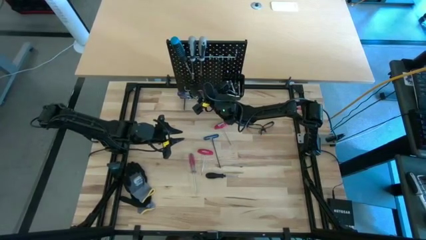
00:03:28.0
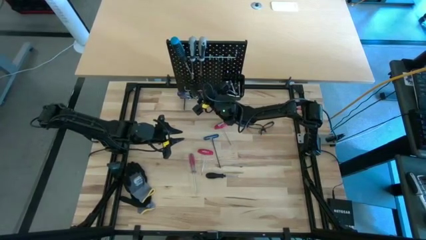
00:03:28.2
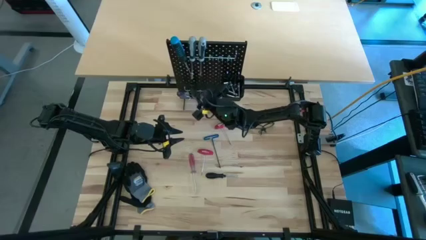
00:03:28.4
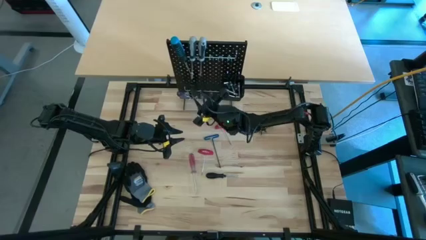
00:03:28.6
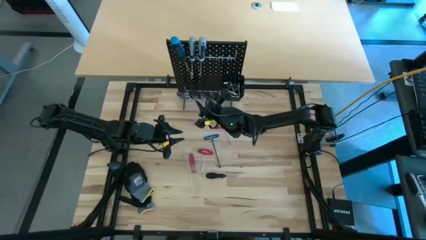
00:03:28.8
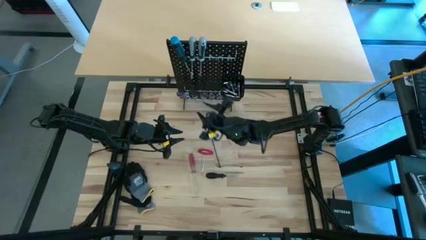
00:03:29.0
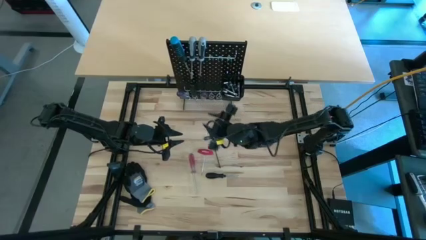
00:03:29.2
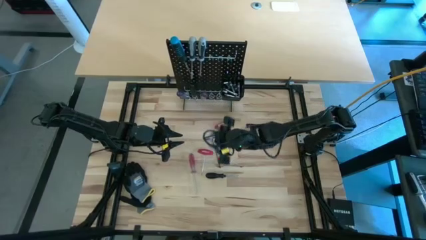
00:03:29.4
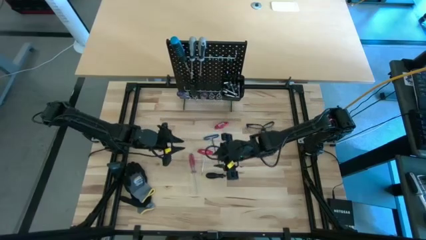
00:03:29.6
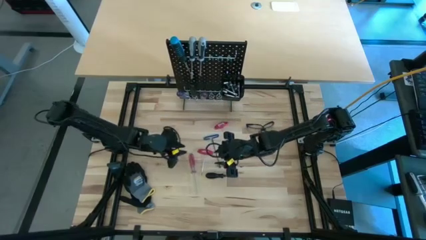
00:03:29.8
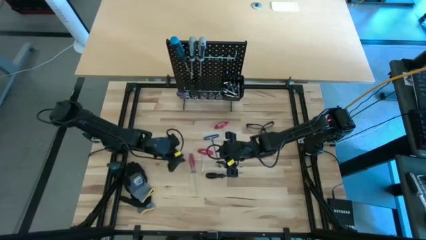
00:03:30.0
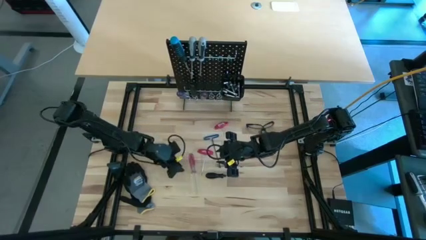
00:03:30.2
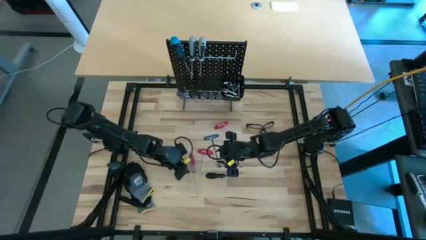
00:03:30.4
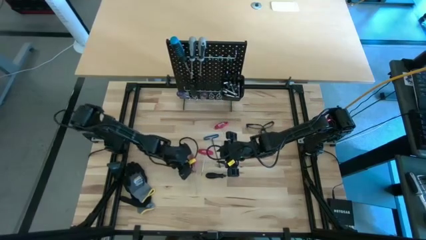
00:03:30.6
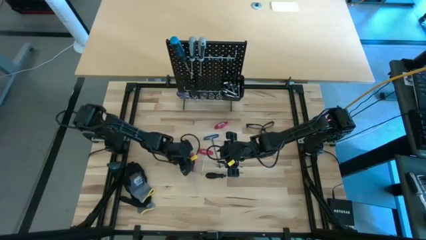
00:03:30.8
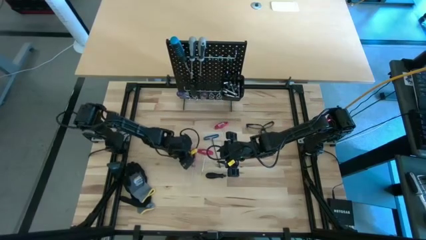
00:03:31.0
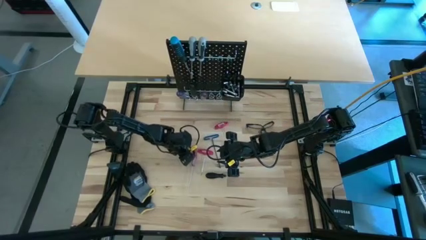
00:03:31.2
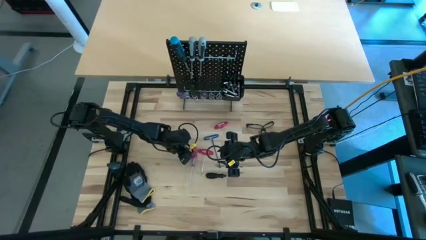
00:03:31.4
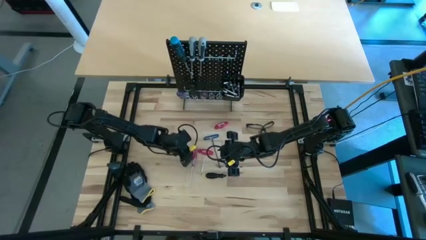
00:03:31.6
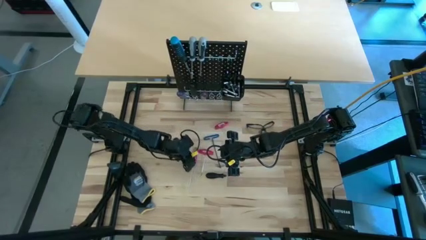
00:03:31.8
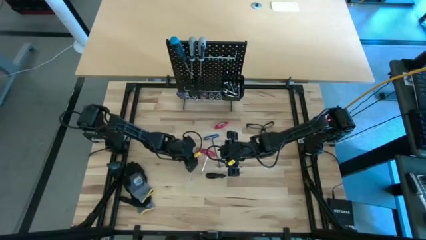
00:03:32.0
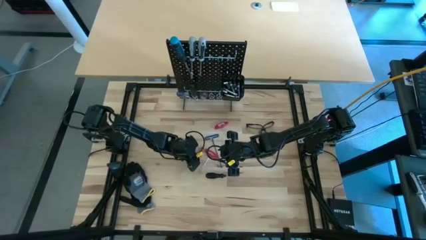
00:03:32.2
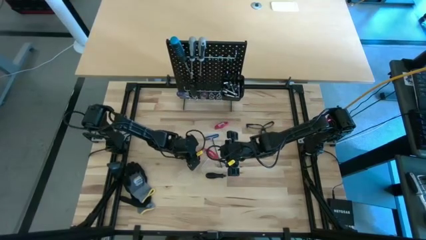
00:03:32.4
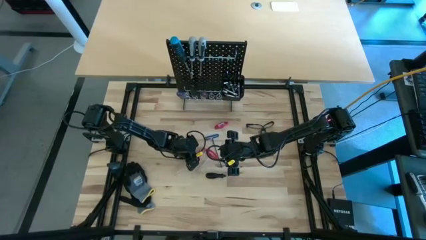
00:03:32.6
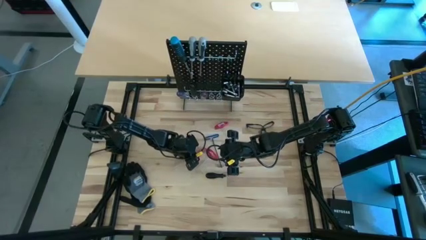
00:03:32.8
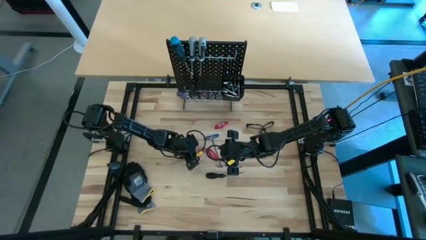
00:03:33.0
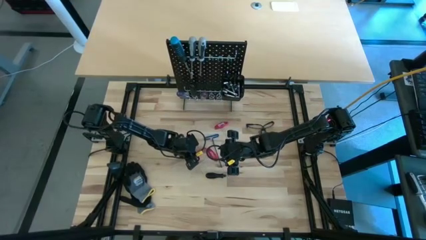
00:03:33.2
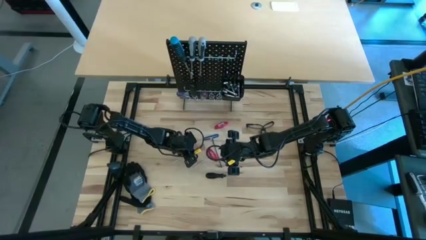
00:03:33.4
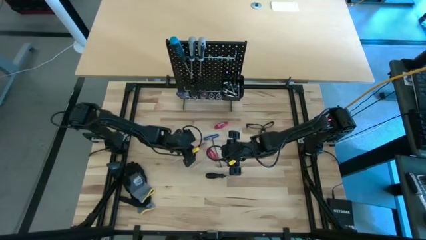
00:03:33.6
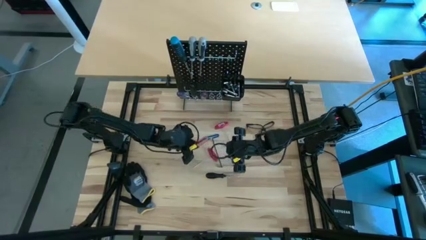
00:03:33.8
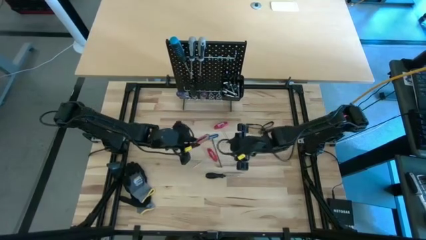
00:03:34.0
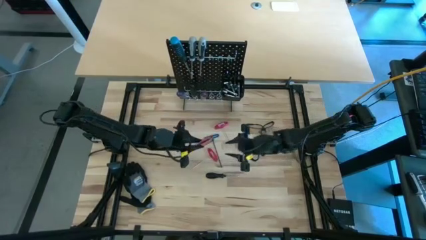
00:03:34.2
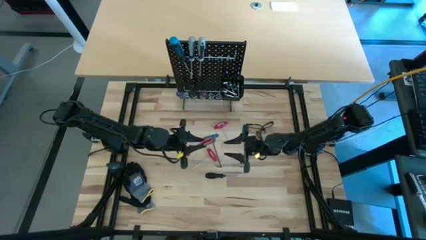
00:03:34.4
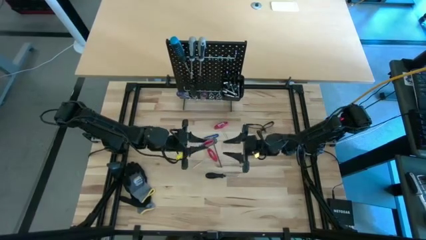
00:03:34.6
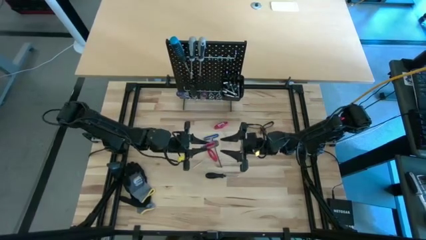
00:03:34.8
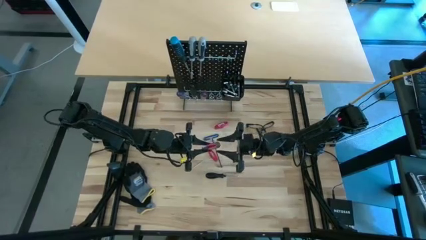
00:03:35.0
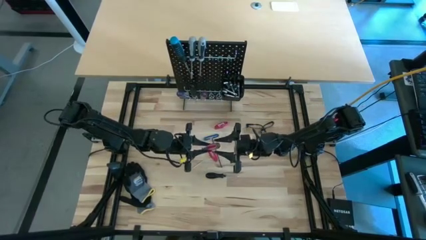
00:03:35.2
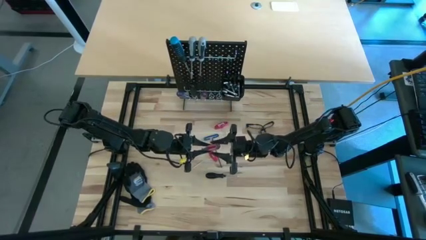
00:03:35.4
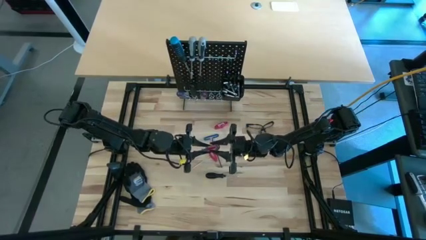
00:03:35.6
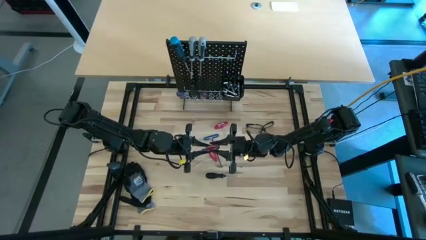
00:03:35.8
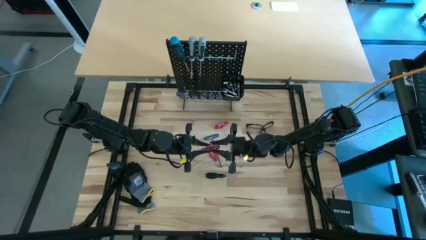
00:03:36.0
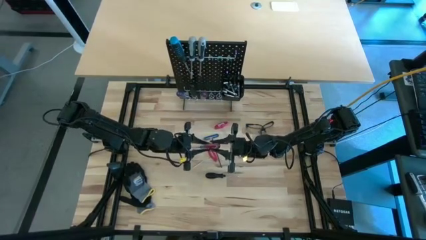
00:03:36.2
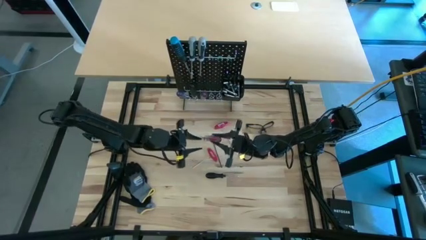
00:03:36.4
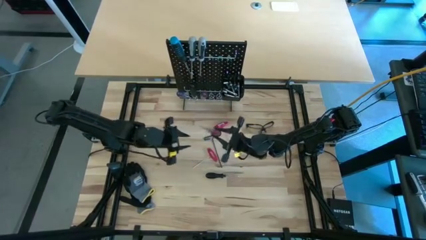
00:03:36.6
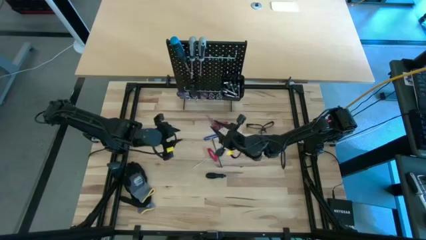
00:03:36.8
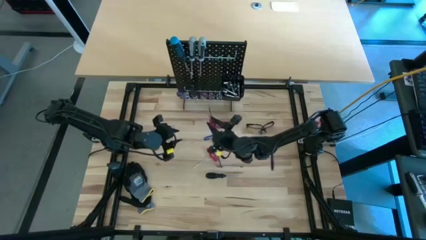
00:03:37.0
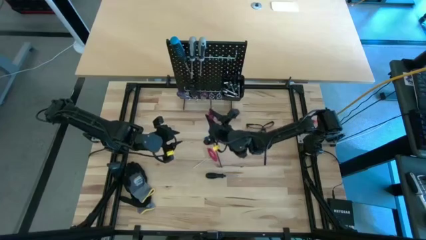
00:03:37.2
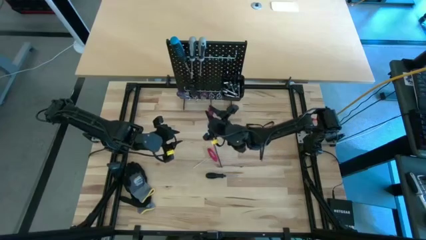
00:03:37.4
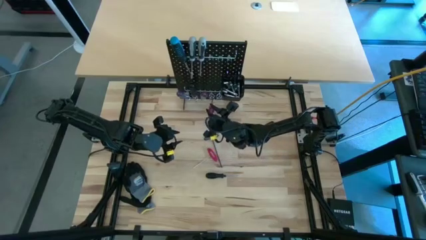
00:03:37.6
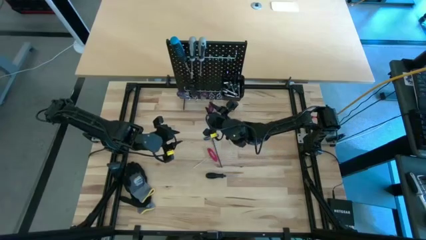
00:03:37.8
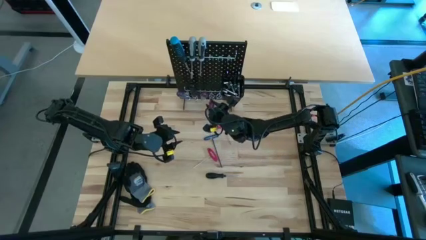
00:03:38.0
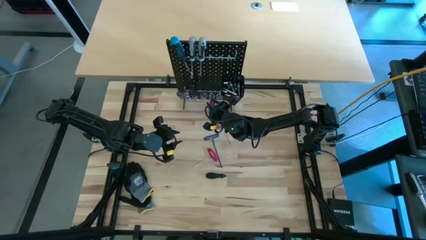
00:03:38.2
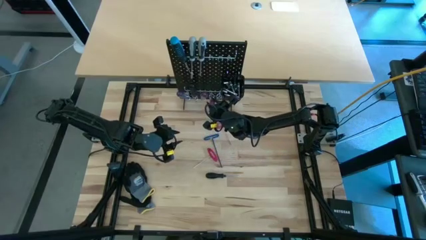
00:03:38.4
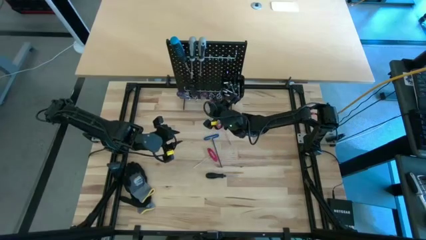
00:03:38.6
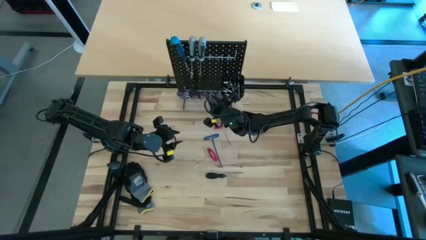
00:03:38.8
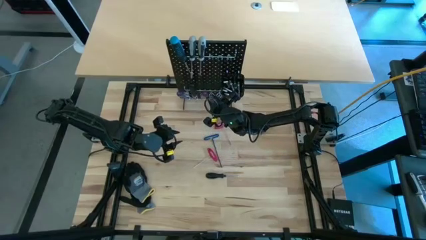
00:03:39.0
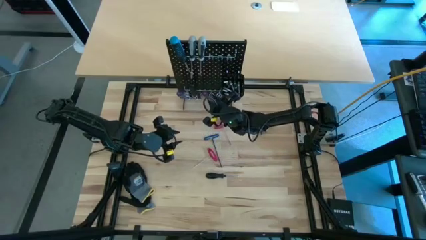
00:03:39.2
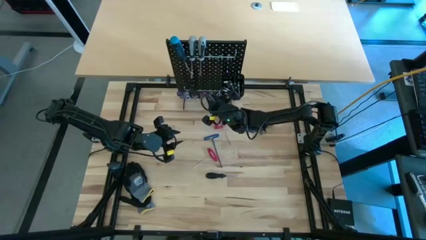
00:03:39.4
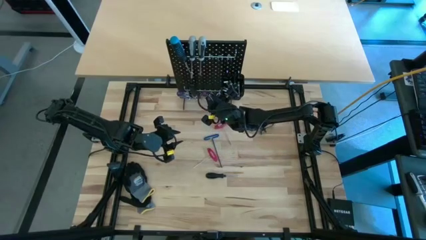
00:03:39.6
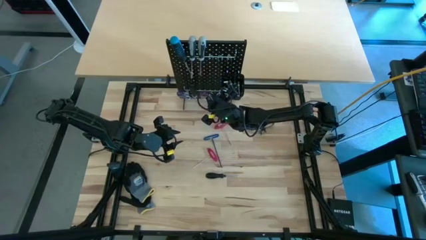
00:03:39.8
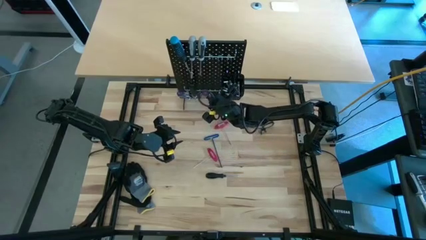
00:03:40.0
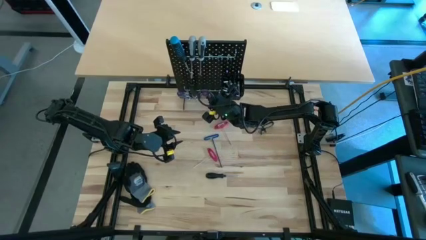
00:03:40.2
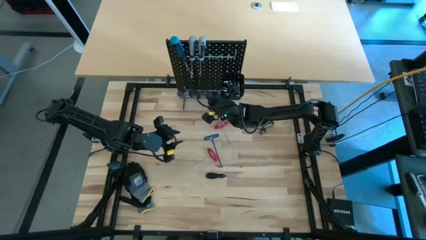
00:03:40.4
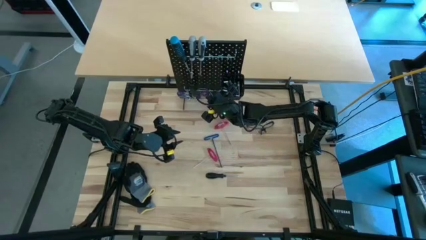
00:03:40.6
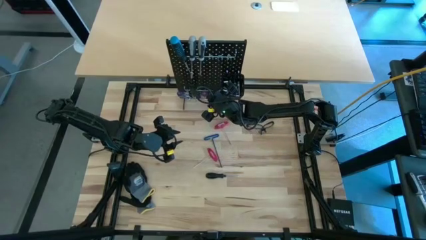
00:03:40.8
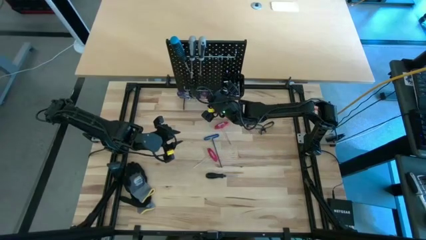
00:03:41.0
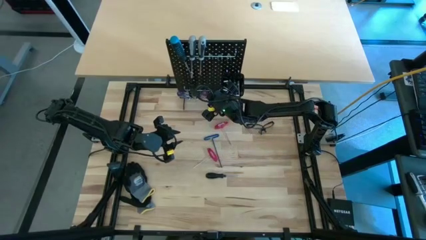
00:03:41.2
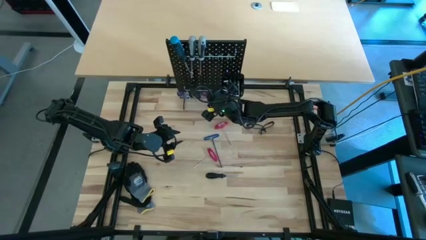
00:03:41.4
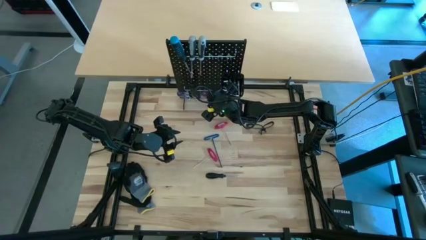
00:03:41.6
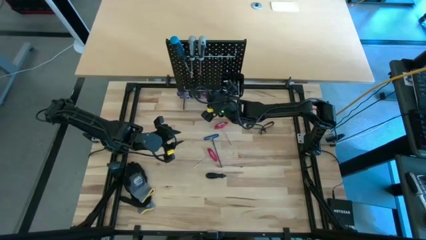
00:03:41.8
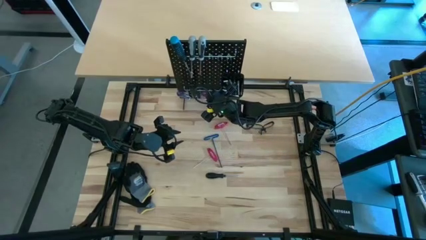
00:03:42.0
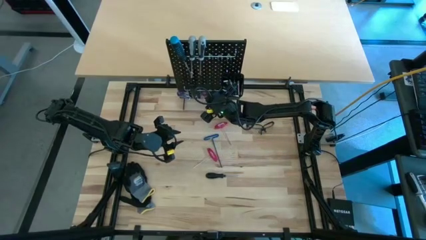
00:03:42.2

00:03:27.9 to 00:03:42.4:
Task: Hang tools onto peg board
Hang the red screwdriver on the peg board
